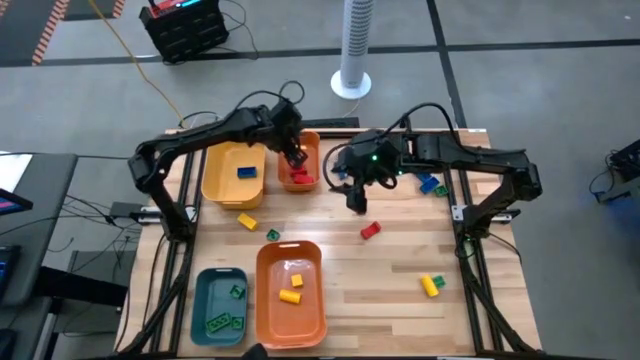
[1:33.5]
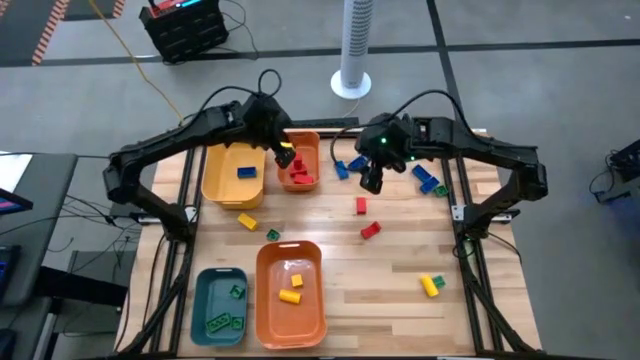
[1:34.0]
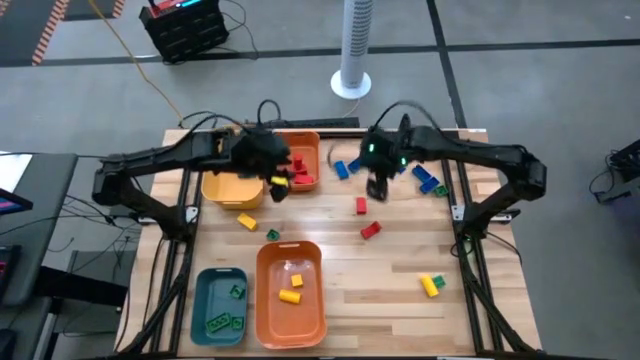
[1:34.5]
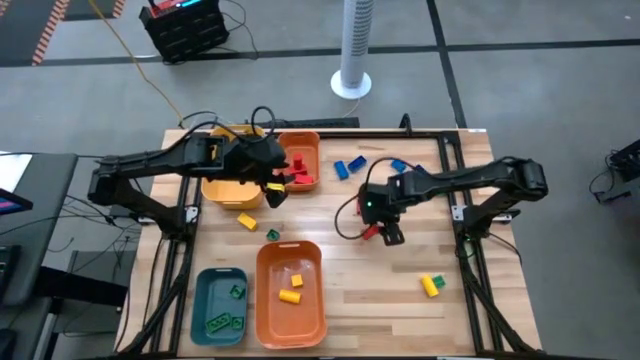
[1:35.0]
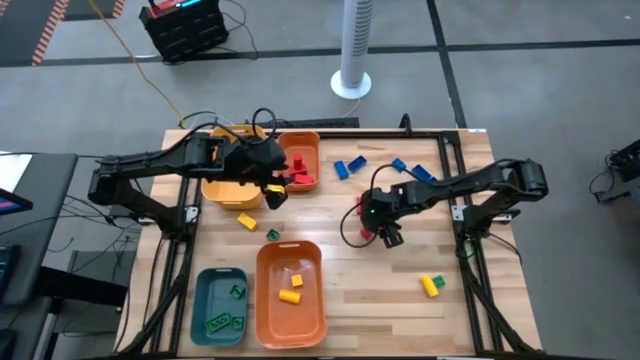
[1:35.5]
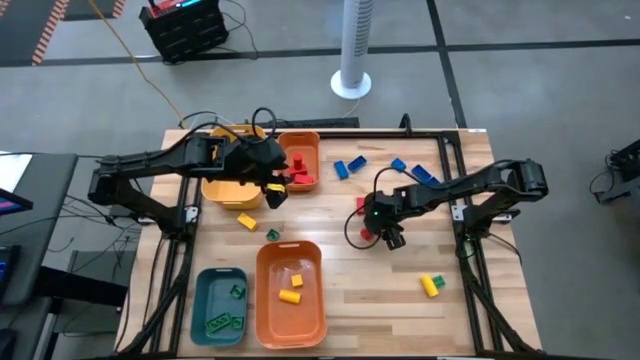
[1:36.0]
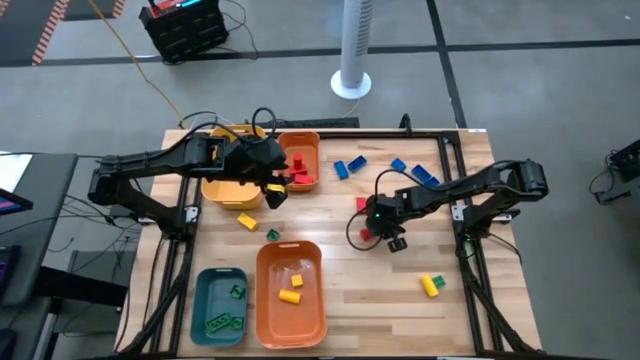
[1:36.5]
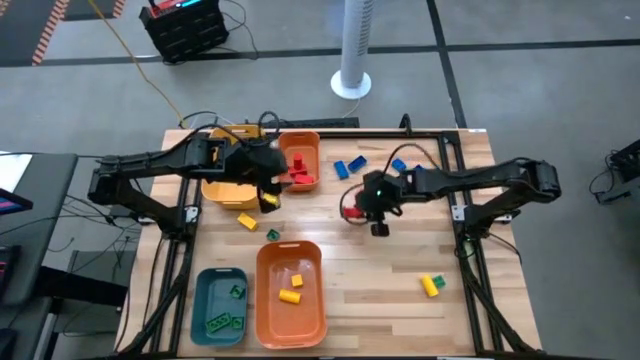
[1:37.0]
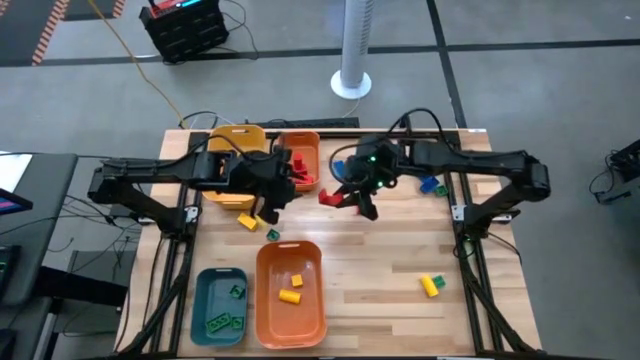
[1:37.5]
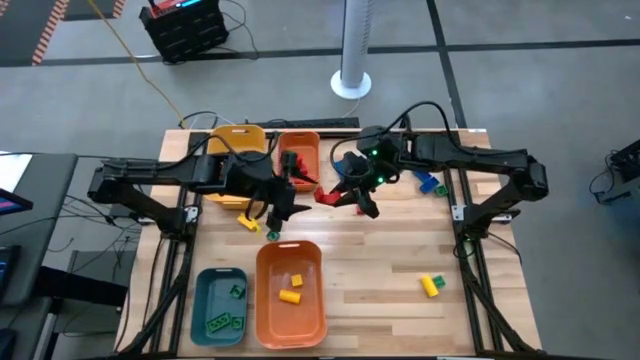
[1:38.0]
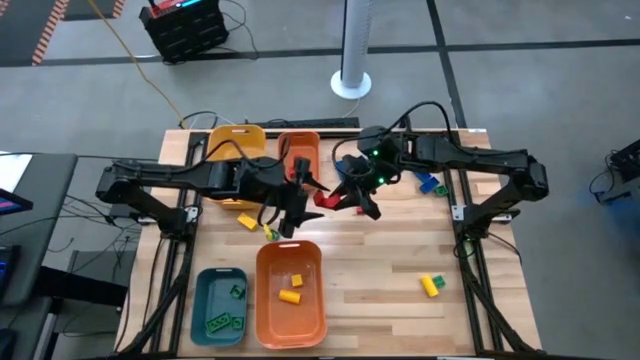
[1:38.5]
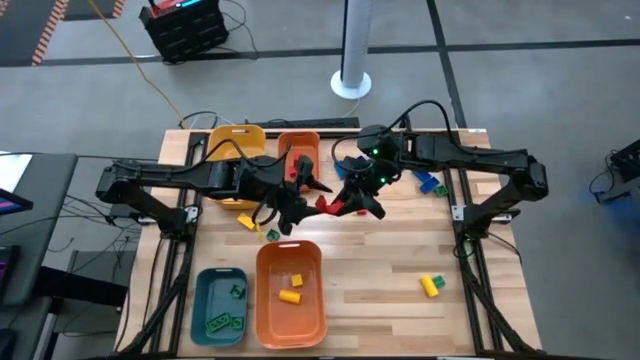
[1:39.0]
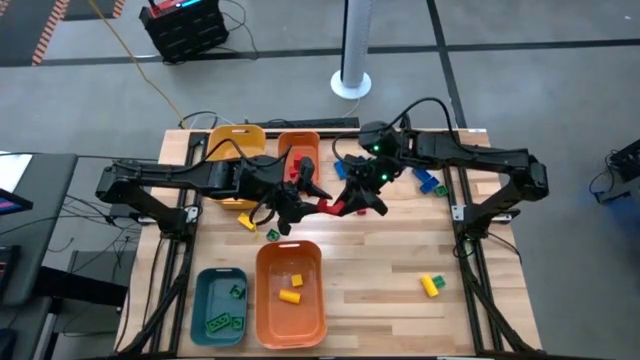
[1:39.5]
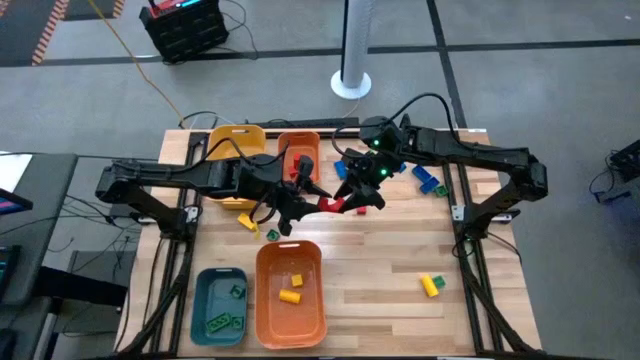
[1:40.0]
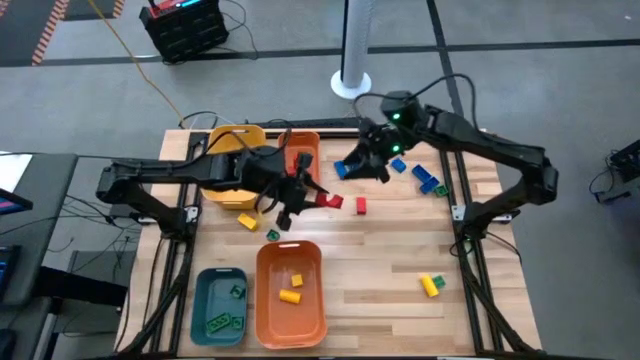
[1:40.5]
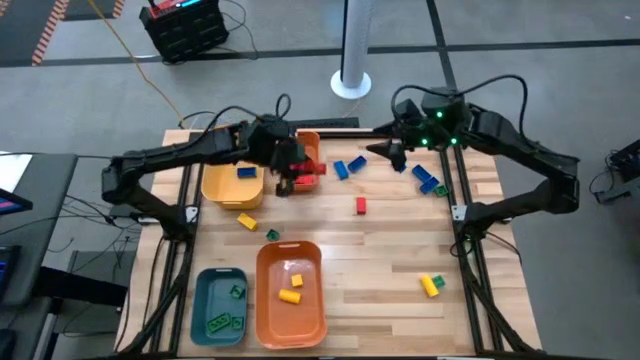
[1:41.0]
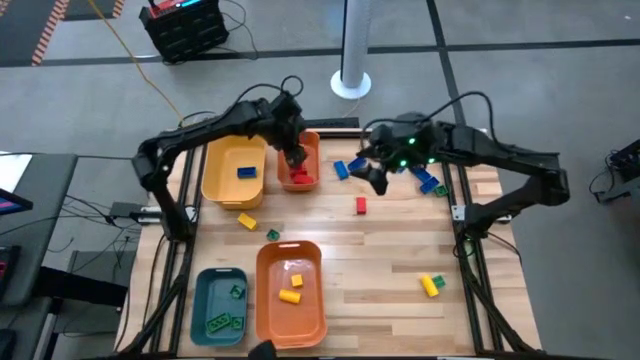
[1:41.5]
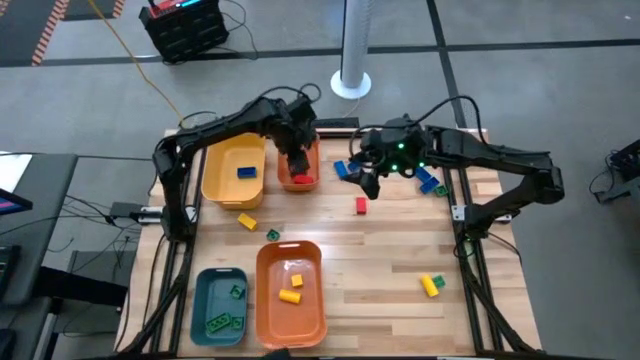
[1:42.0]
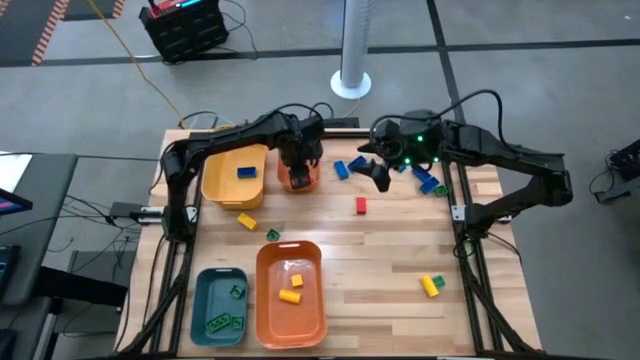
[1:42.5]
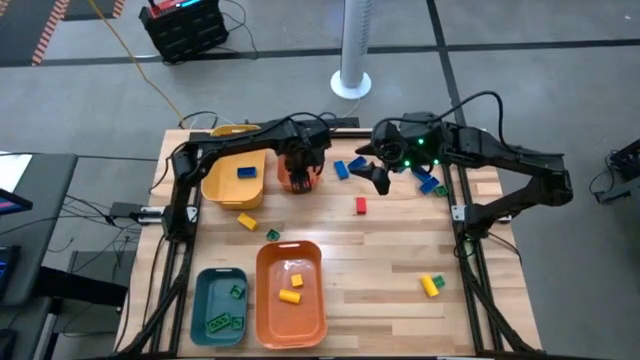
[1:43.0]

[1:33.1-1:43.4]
Task: Sort blocks
Put the red block into the top orange bin

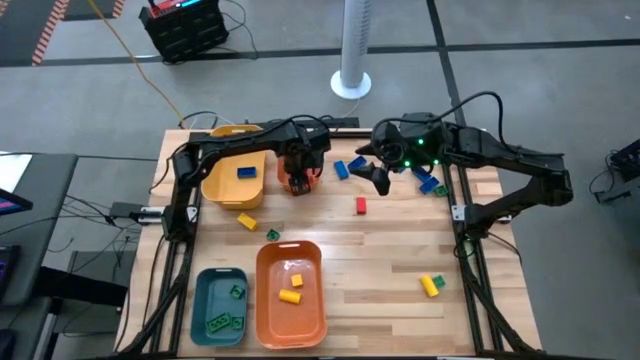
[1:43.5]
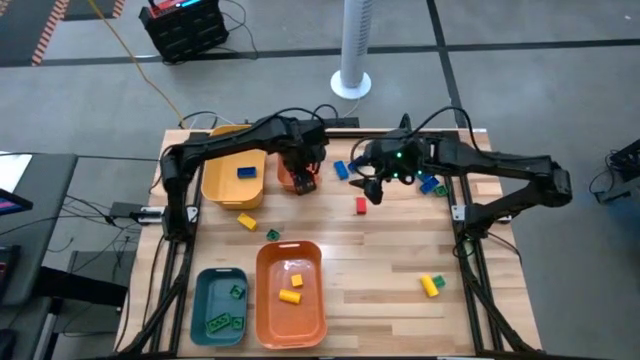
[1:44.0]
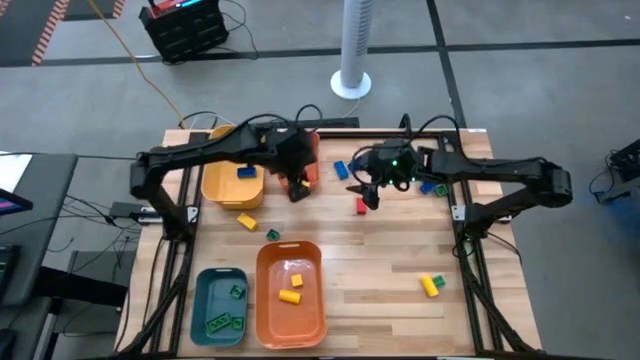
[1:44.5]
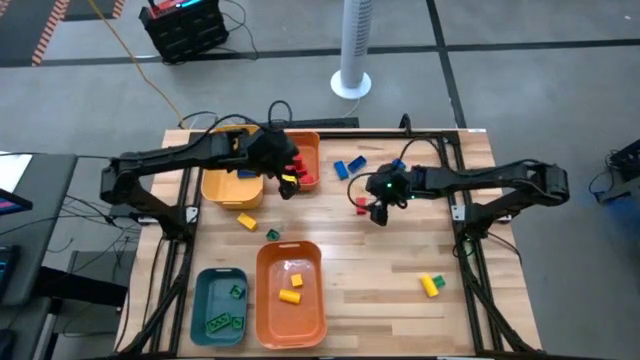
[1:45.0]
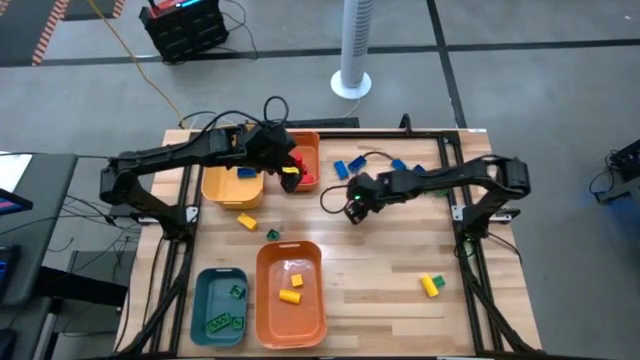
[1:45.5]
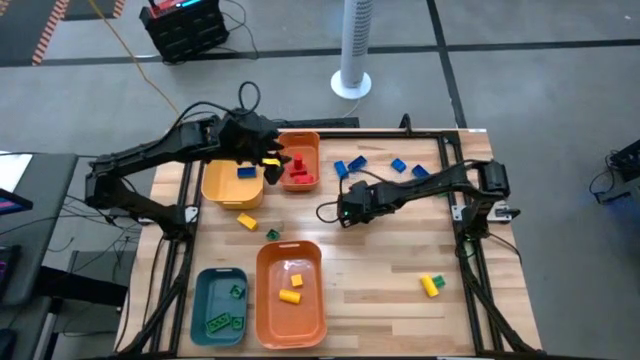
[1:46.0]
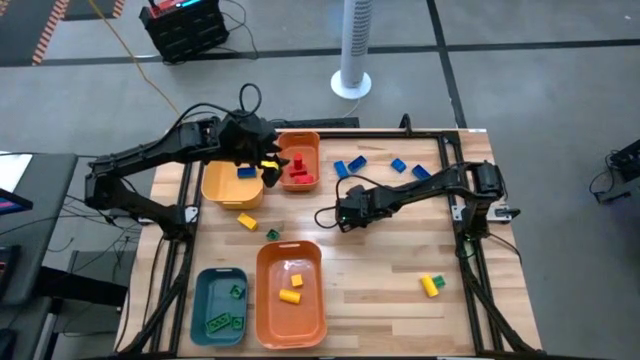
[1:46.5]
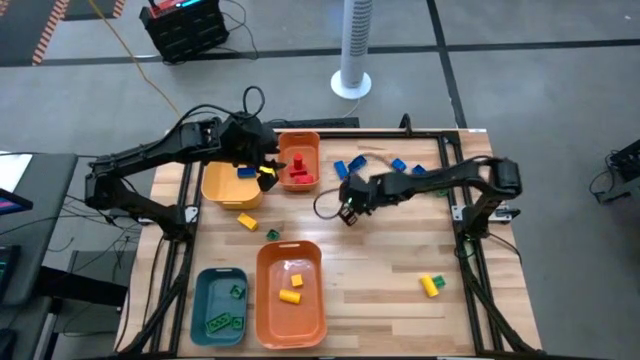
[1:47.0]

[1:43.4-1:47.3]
Put the red block into the top orange bin

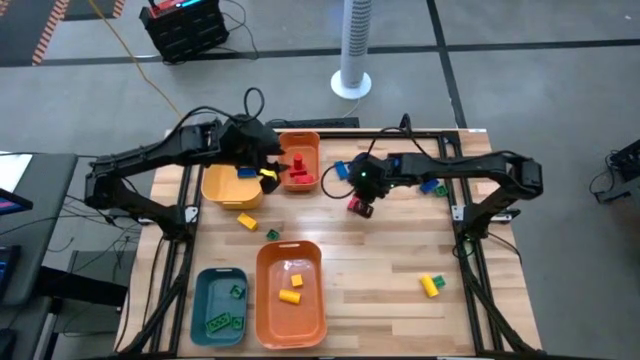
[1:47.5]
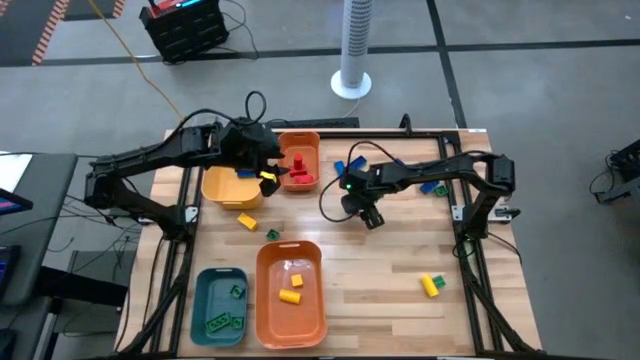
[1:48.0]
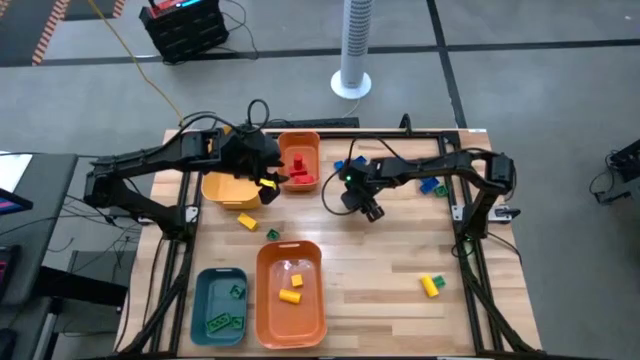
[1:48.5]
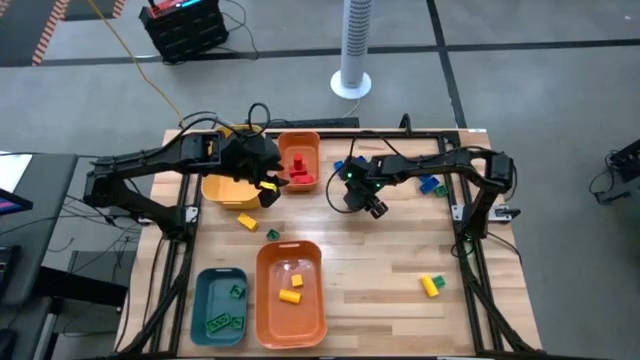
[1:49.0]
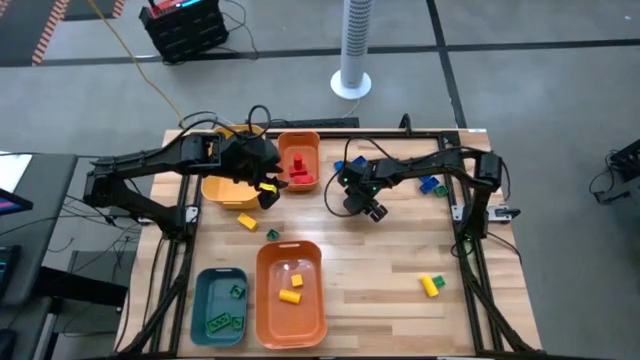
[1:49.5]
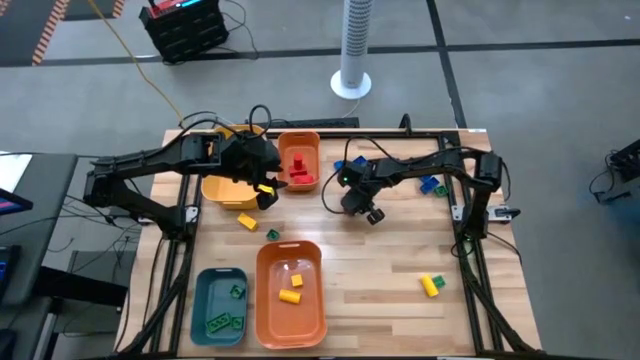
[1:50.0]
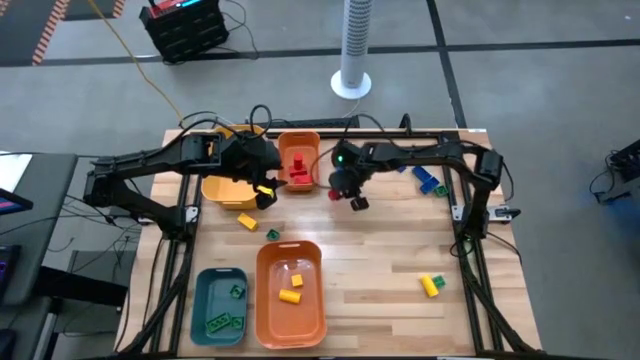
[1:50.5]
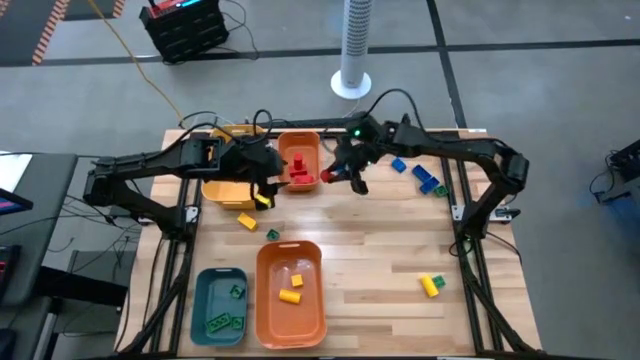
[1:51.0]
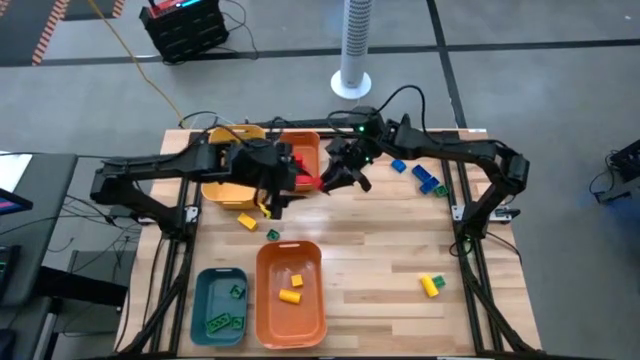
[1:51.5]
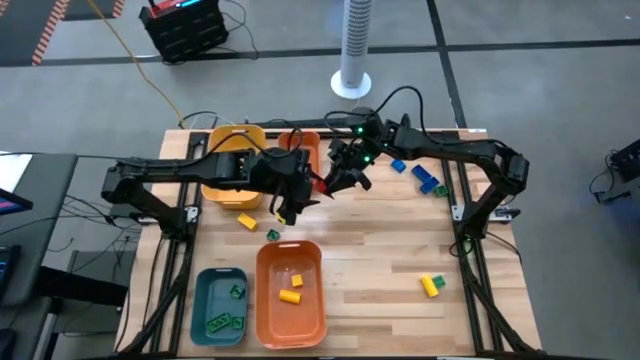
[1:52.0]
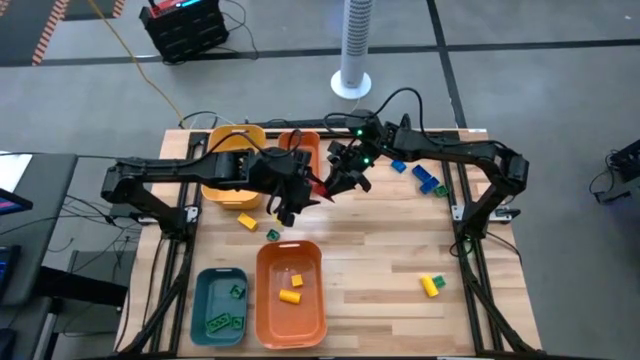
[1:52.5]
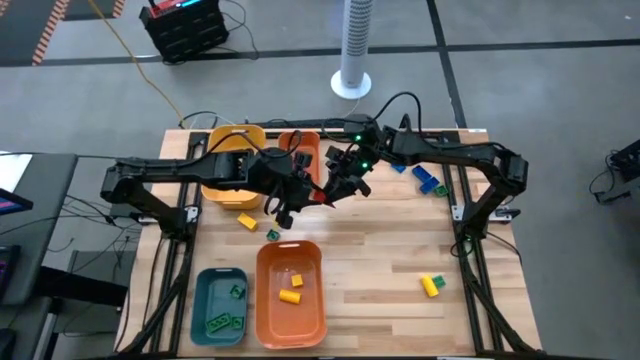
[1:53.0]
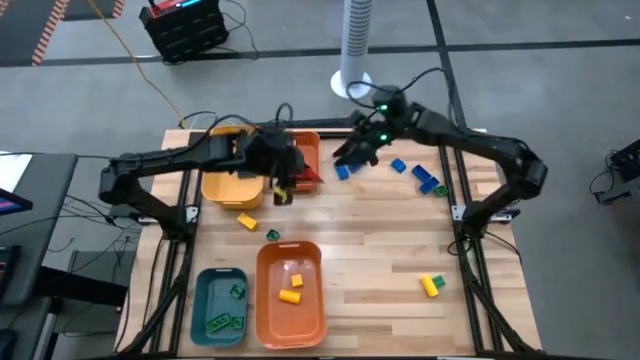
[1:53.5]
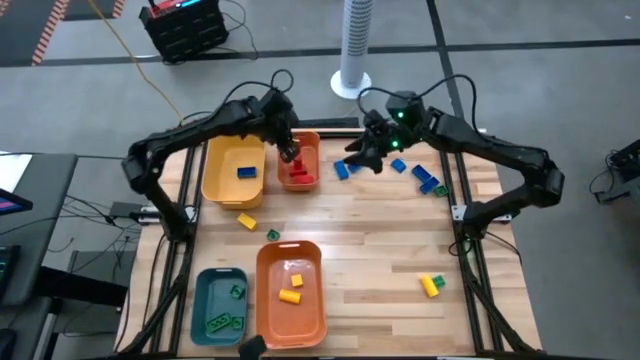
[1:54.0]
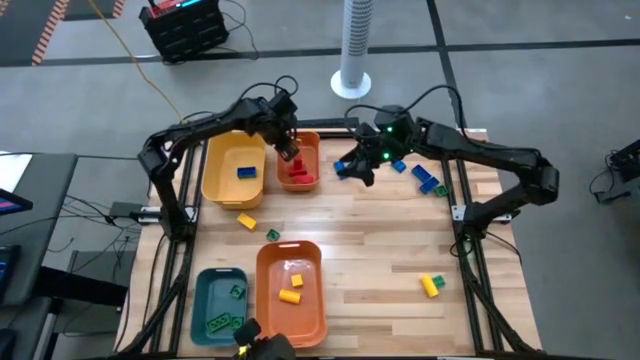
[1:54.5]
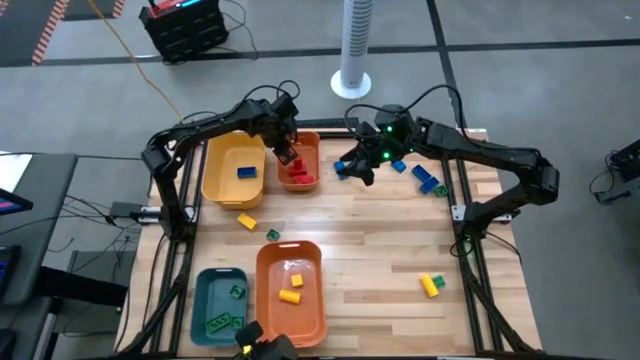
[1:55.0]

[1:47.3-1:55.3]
Put the red block into the top orange bin
